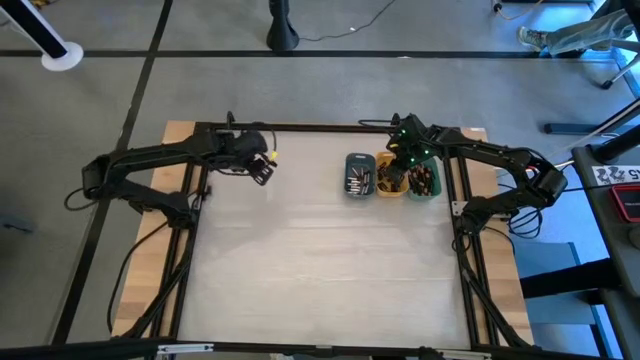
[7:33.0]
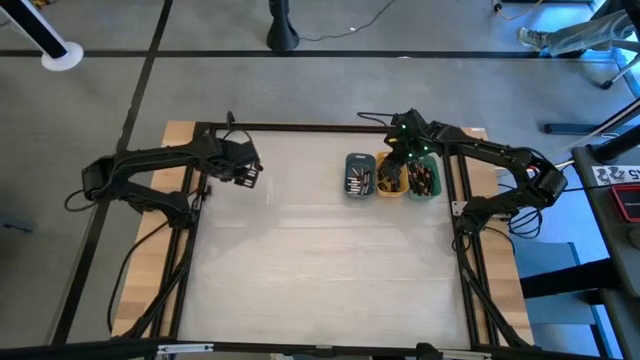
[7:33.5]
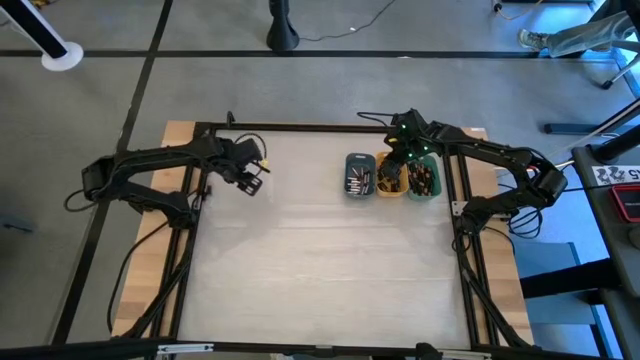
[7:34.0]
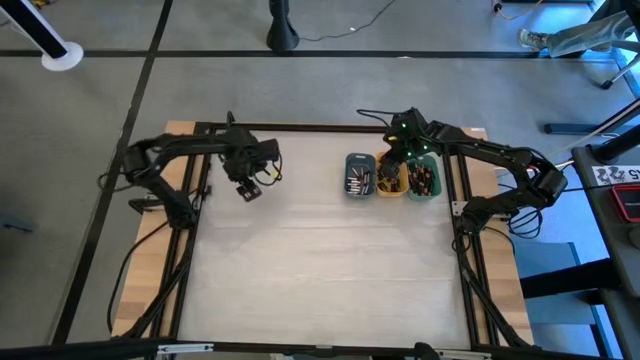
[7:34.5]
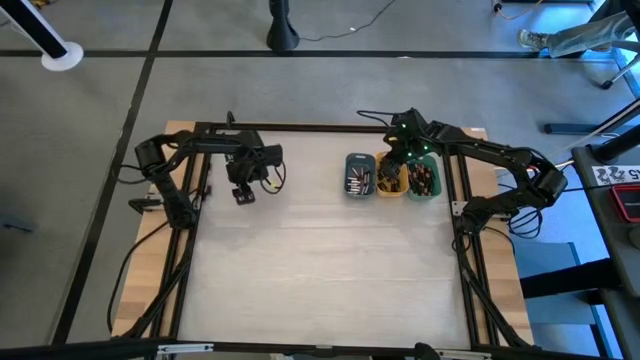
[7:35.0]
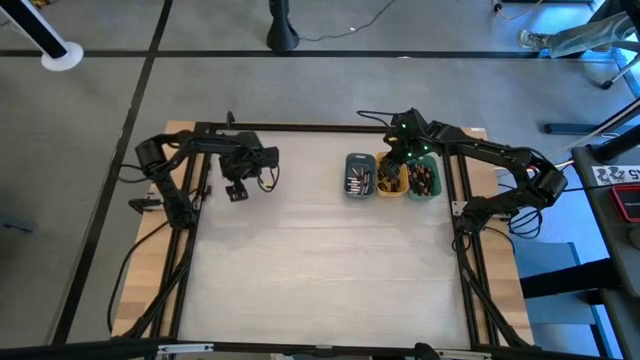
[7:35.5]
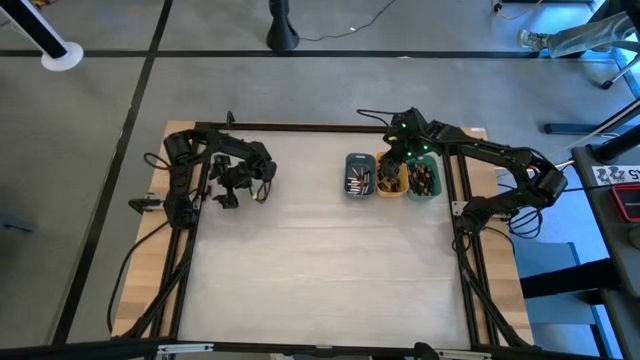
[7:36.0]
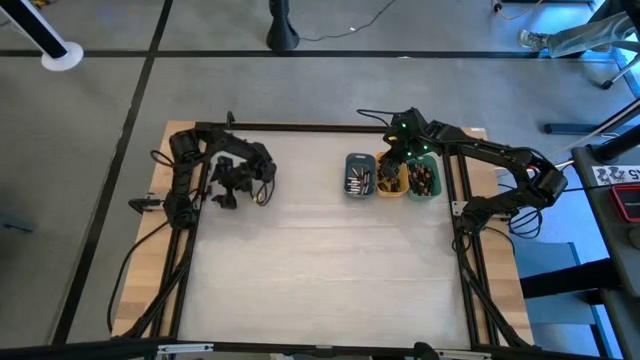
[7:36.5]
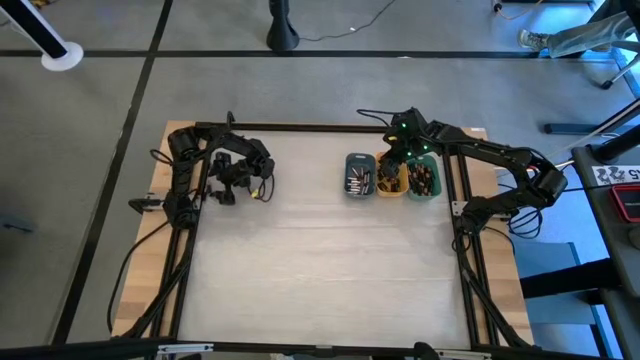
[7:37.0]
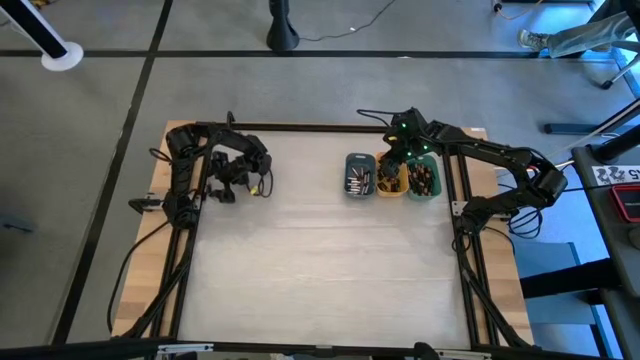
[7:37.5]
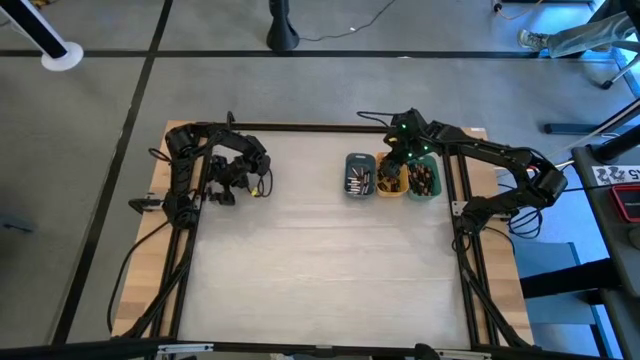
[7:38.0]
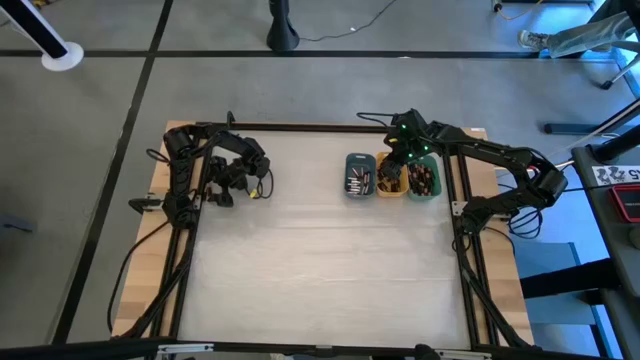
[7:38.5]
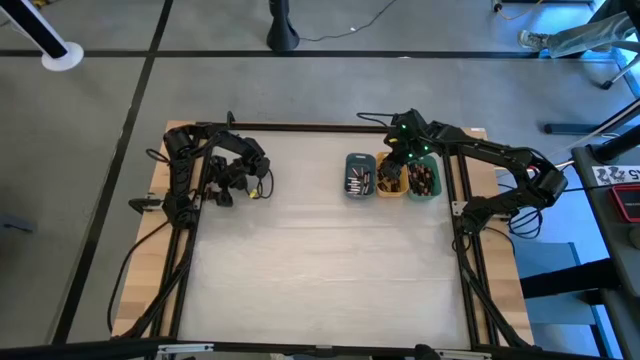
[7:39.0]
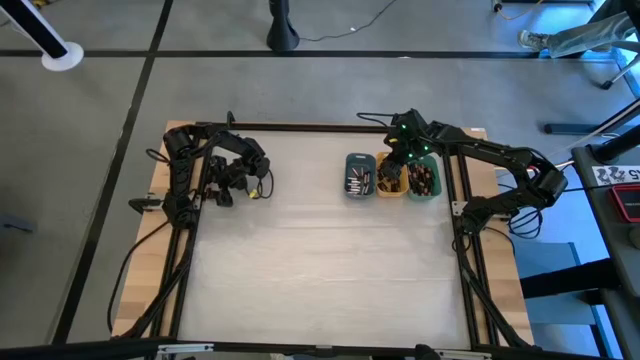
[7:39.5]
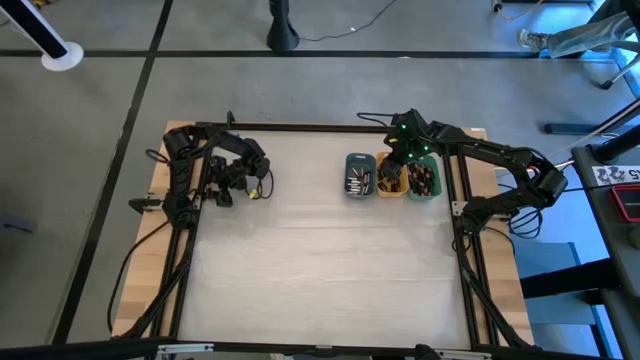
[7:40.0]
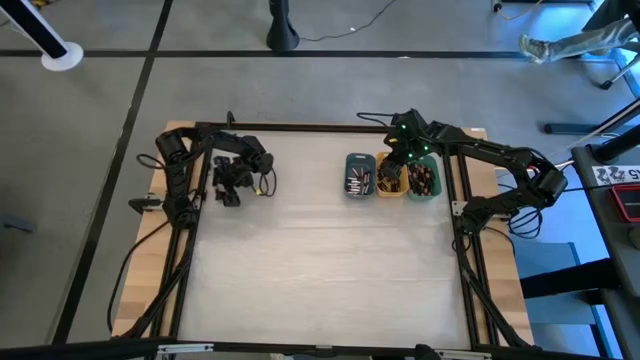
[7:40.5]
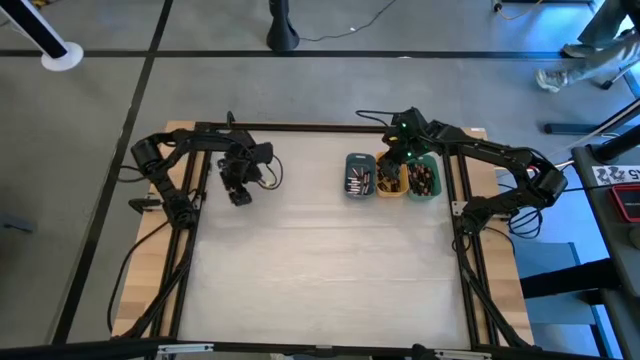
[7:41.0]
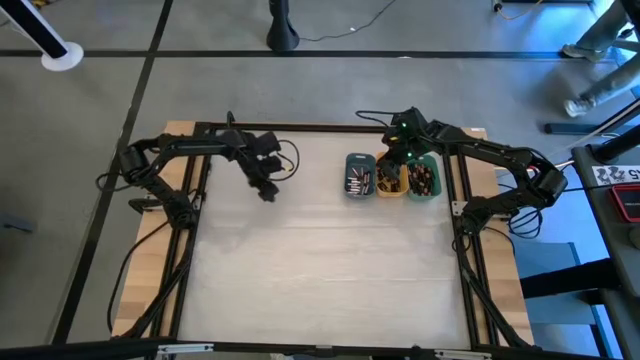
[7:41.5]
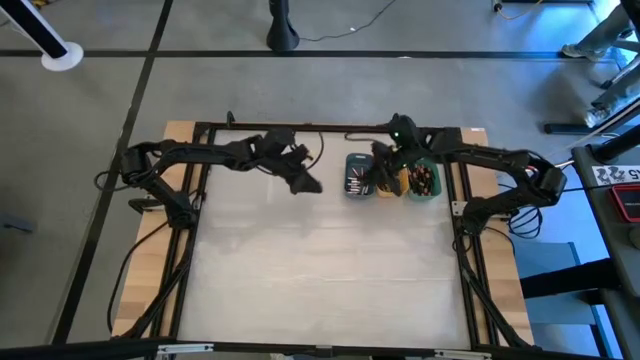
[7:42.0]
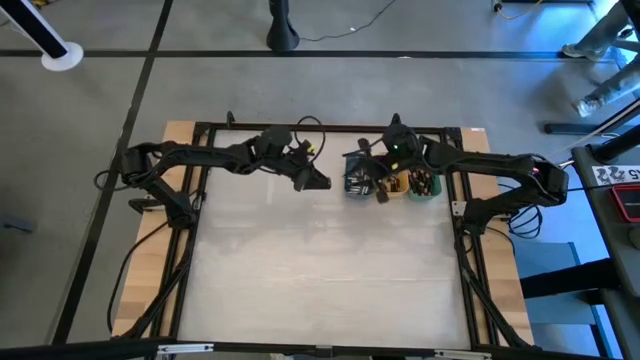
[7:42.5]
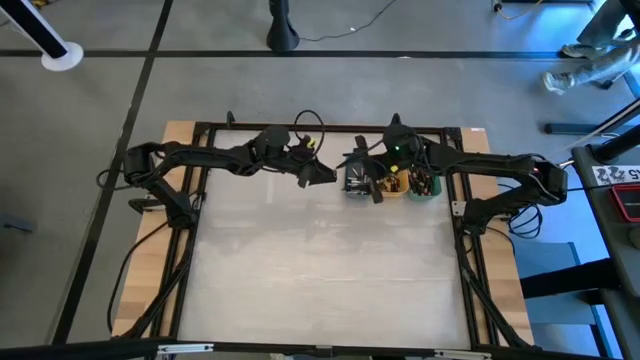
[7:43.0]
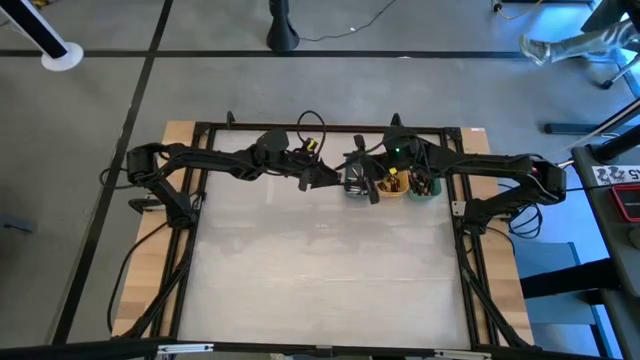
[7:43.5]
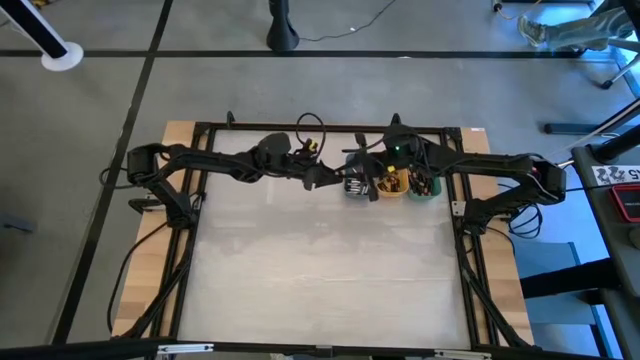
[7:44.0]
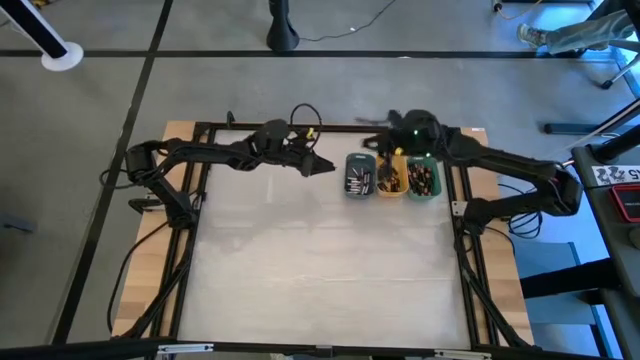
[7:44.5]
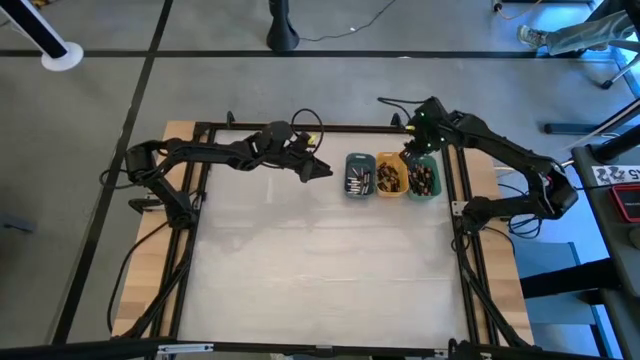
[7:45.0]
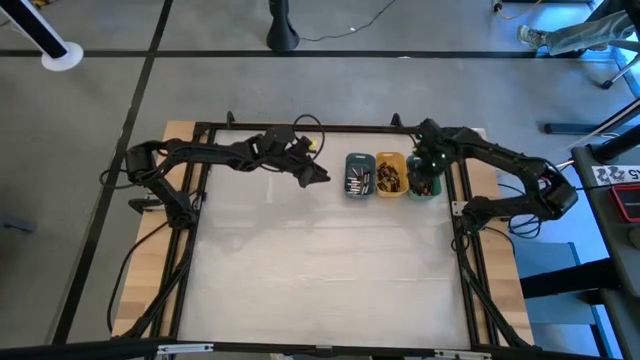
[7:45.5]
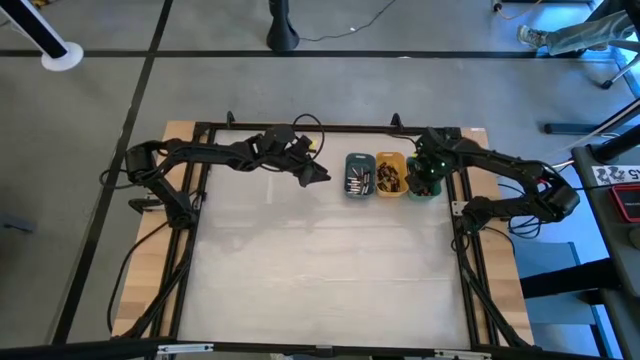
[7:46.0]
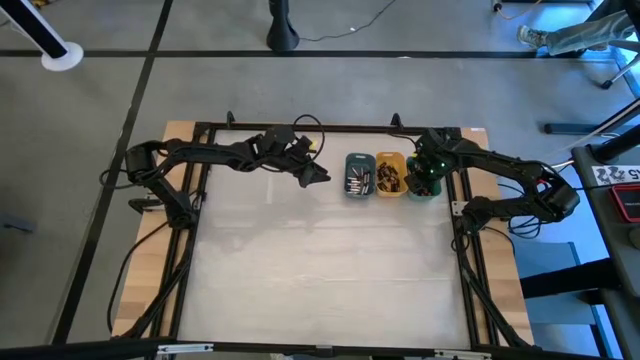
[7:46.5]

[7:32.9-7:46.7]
Task: Sort batteries
Put the black into the green bin

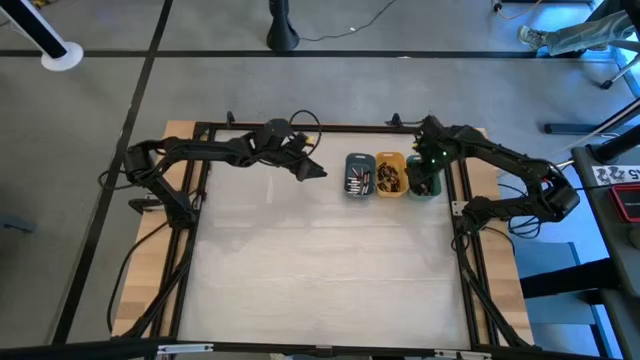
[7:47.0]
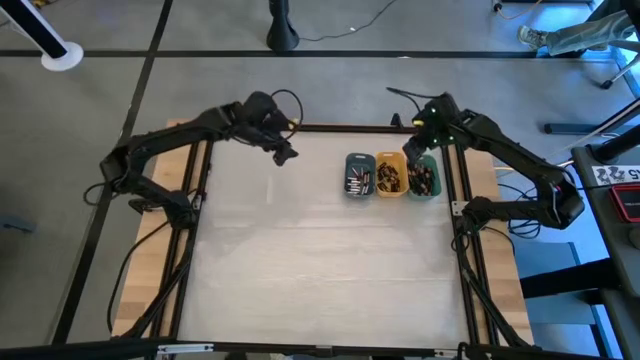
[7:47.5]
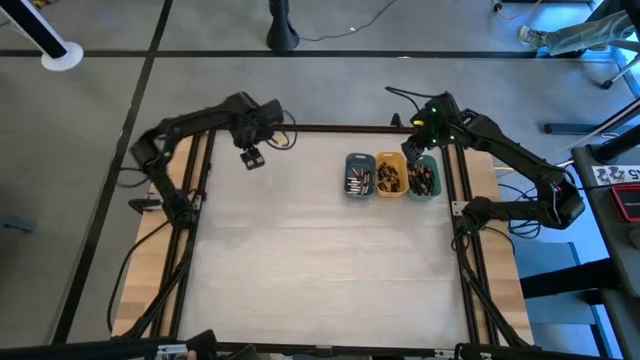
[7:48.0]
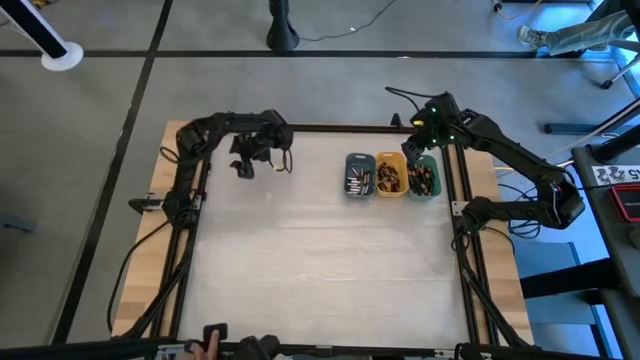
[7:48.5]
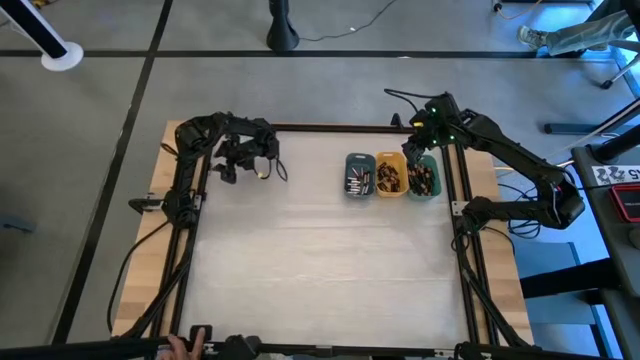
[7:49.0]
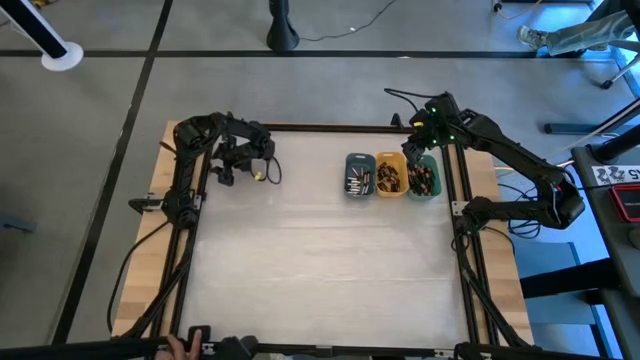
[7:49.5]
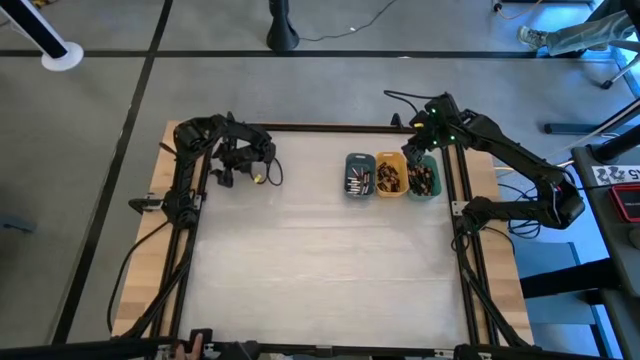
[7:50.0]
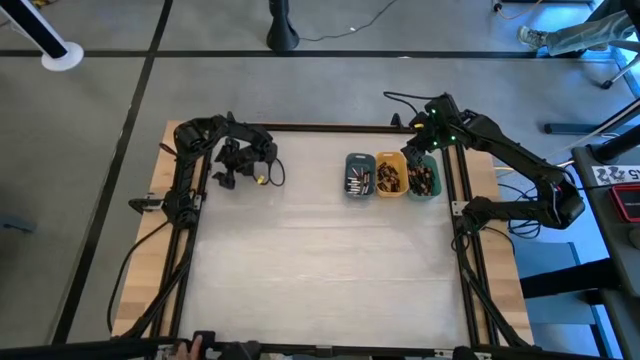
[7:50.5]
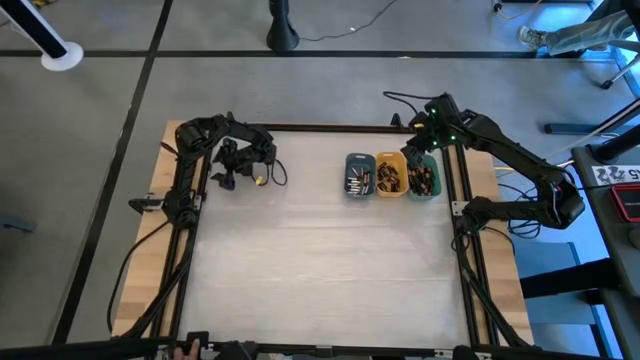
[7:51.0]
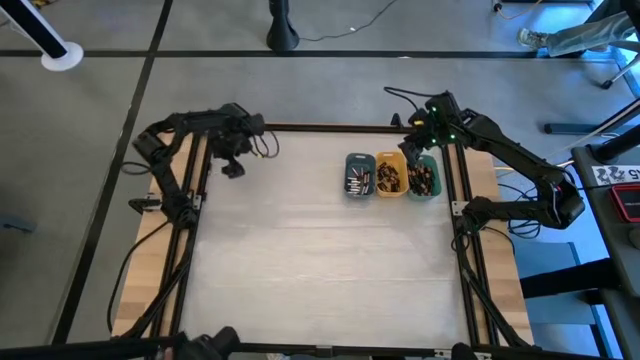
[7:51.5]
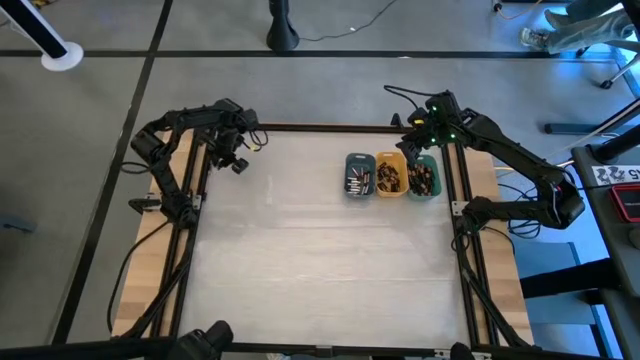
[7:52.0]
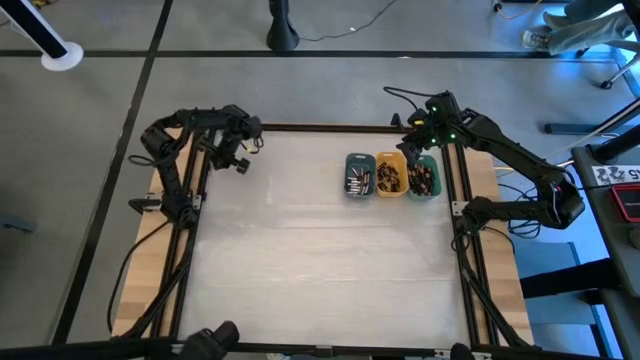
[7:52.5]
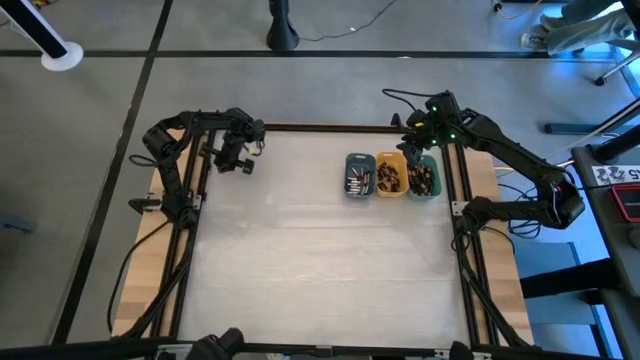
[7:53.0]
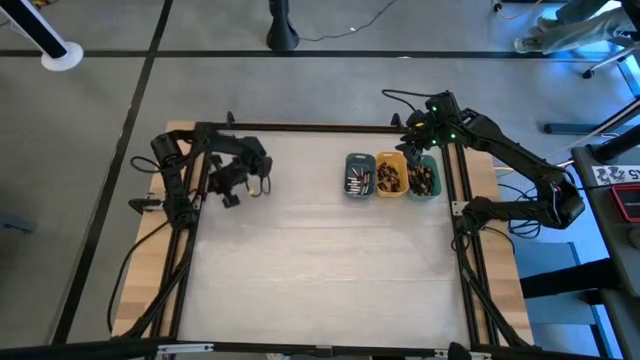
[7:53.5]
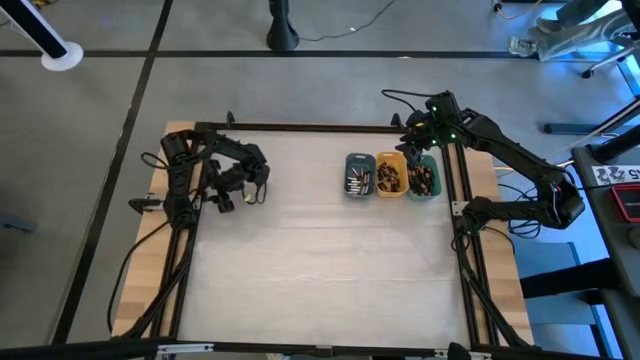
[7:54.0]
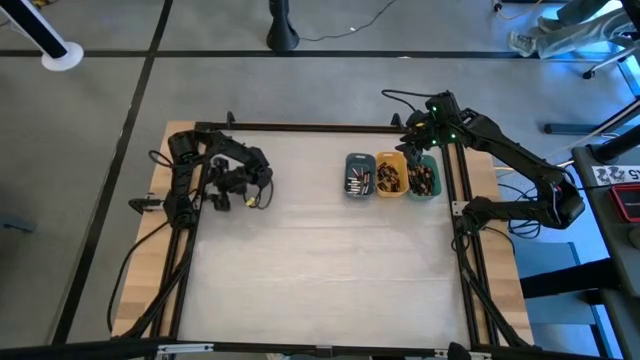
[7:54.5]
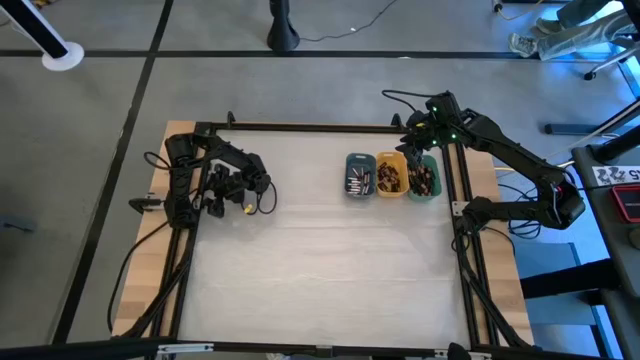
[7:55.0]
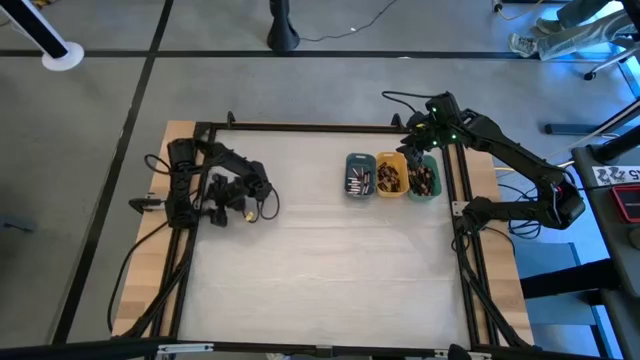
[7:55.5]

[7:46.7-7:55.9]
Put the black battery into the yellow bin
